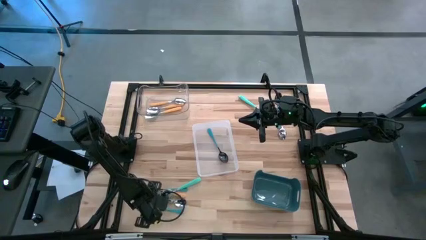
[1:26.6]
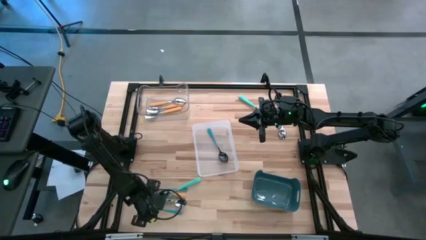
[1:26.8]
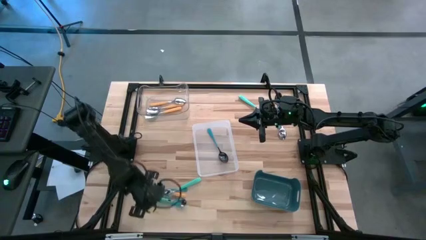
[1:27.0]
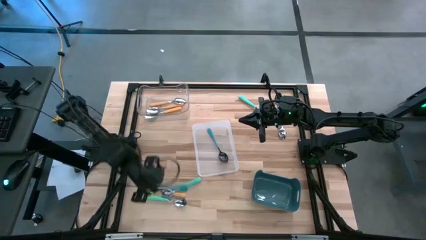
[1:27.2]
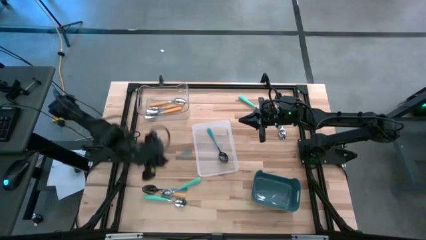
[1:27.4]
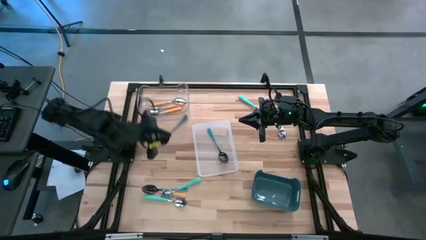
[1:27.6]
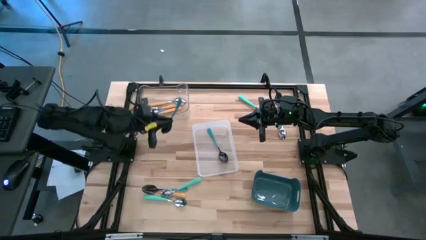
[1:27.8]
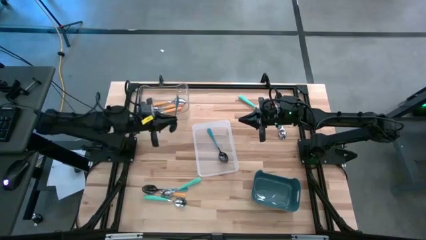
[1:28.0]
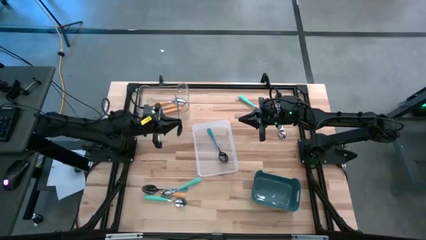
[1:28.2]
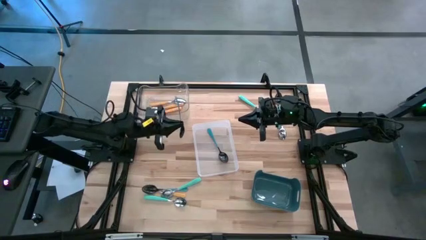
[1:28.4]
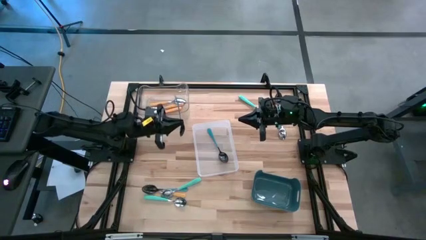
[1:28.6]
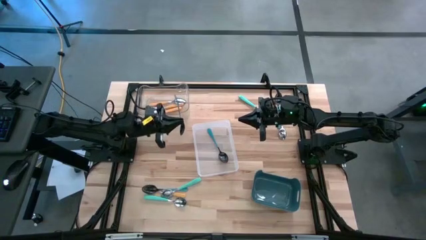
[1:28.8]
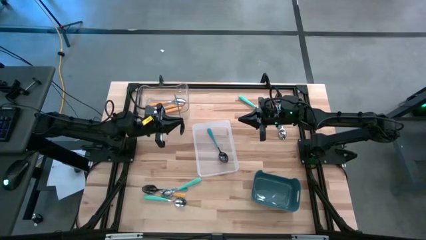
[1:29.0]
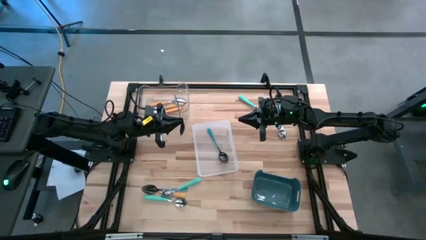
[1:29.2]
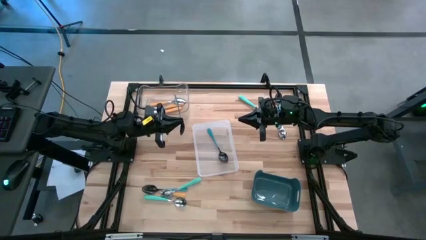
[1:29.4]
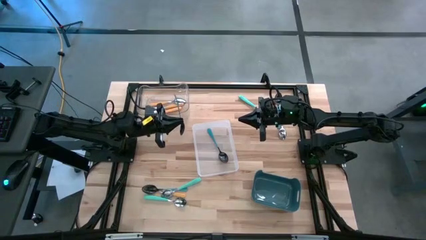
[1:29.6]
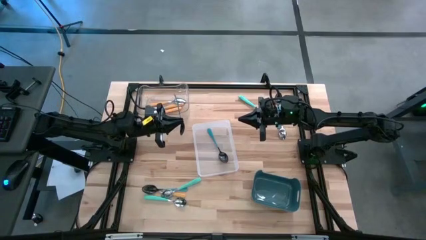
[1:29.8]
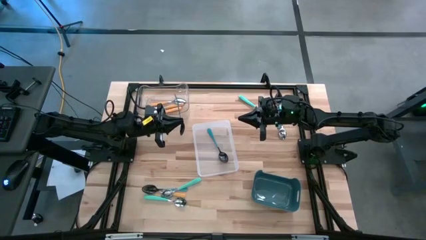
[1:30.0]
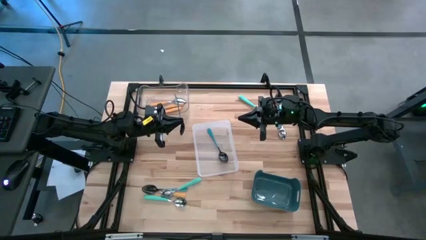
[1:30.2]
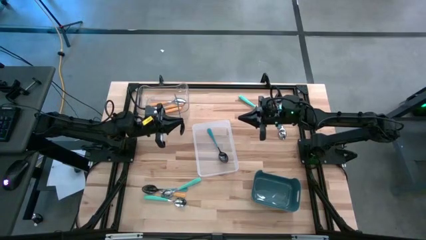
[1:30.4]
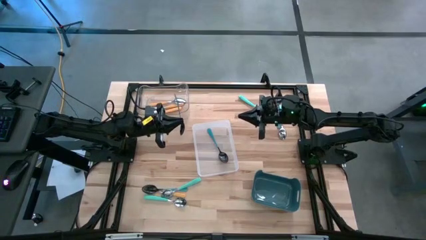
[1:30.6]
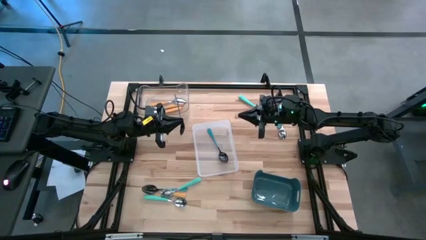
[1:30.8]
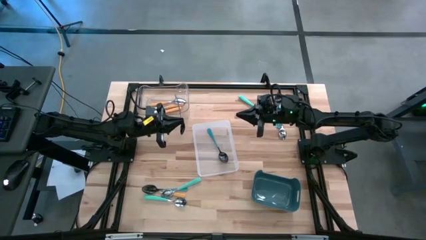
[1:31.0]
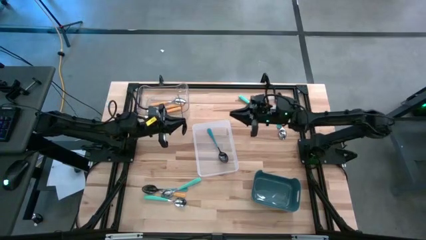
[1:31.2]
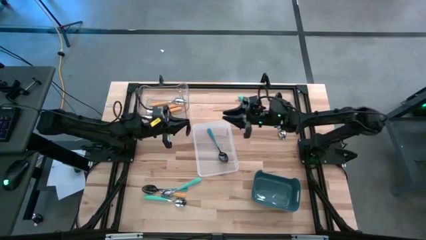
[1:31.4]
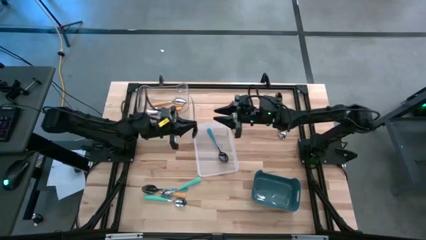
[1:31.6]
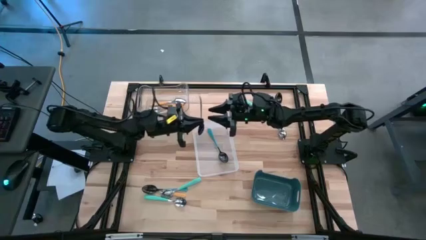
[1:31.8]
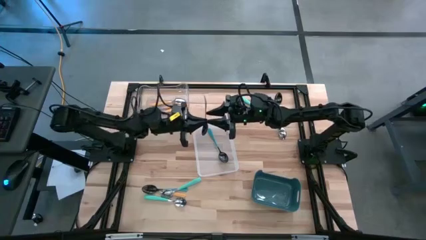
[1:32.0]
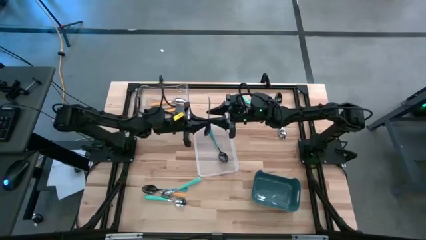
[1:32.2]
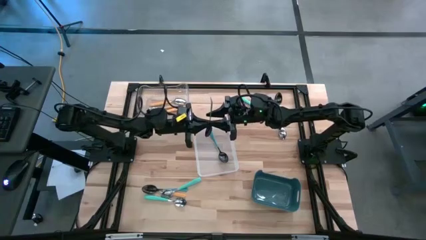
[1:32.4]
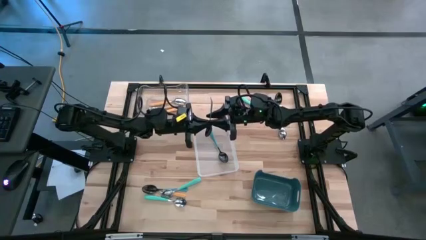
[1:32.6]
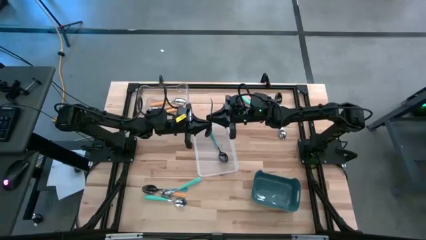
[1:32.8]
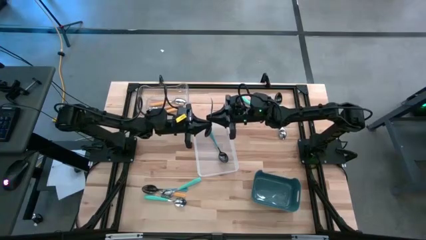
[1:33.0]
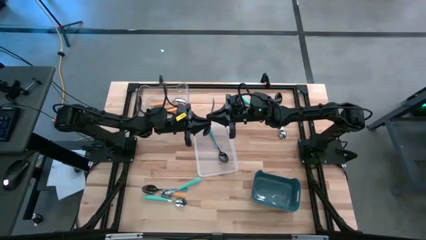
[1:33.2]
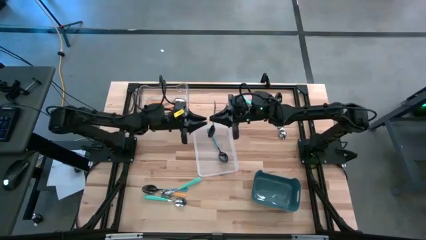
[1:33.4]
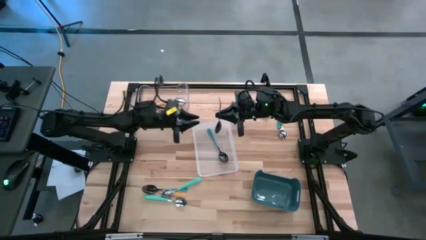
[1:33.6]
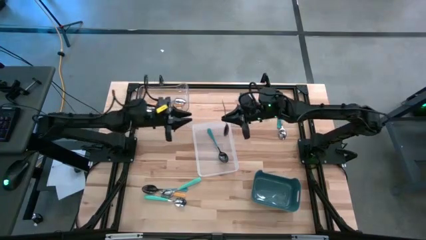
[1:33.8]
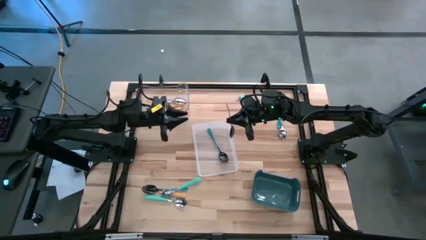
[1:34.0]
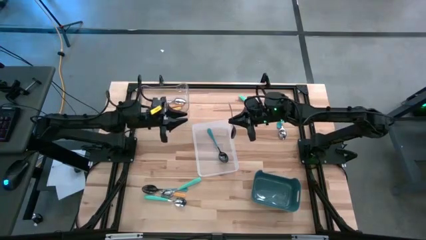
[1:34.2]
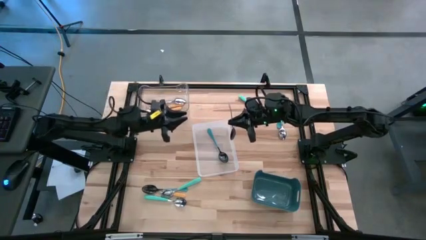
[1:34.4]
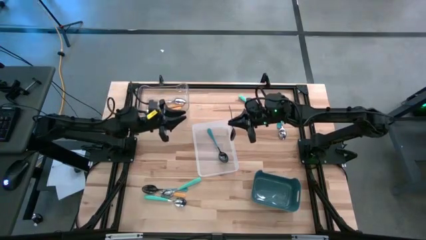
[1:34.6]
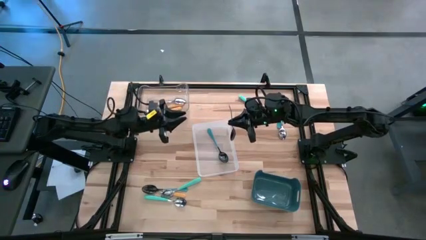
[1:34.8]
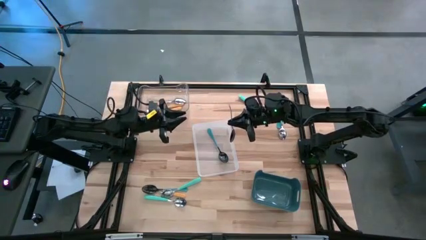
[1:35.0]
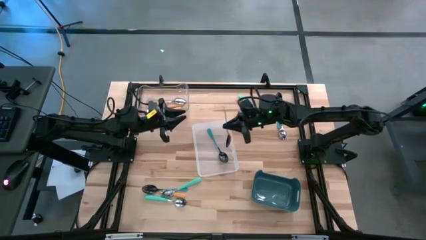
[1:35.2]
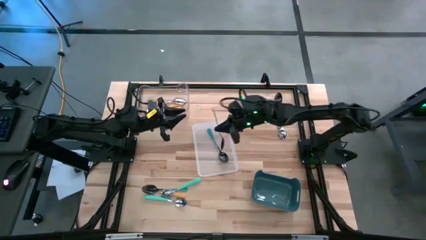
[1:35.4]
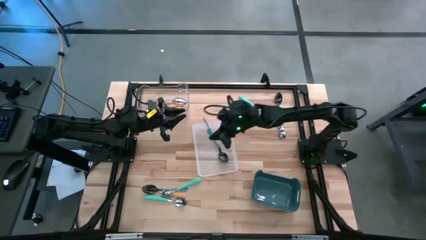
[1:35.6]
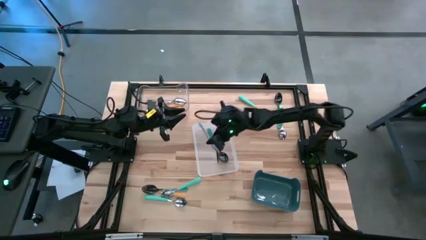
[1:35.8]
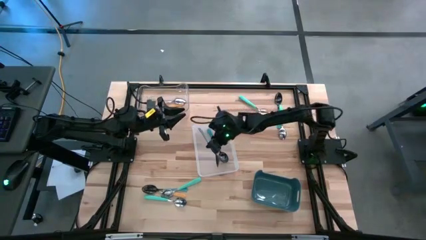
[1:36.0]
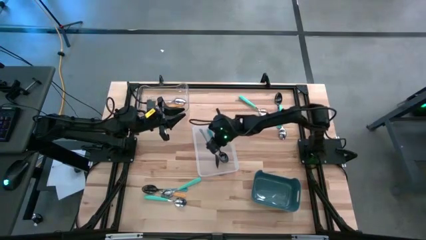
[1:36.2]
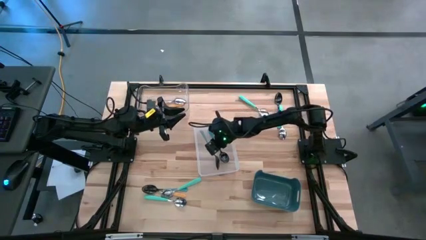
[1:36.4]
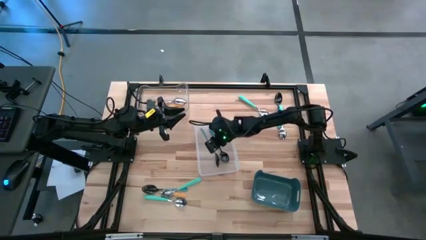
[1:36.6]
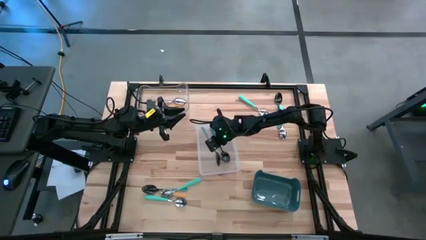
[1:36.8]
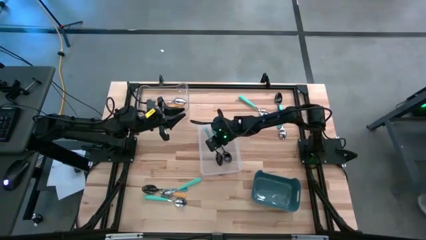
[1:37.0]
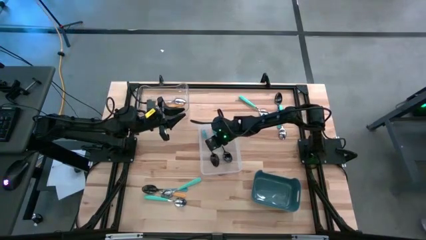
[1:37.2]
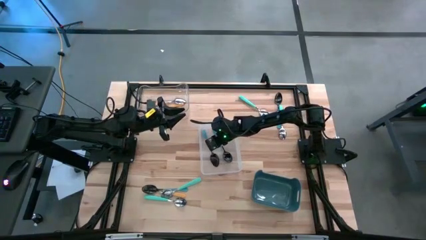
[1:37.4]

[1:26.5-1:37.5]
Task: Sort silverware by color (type)
Put the blue spoon into the white transparent bin
